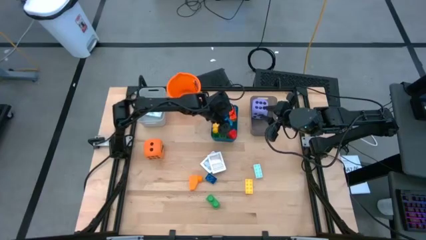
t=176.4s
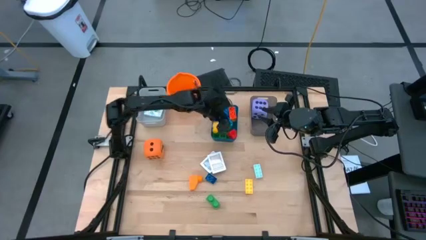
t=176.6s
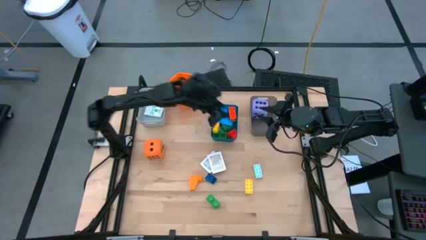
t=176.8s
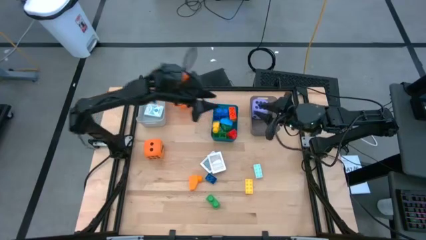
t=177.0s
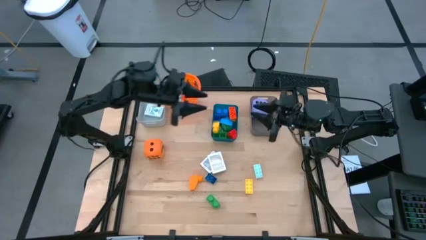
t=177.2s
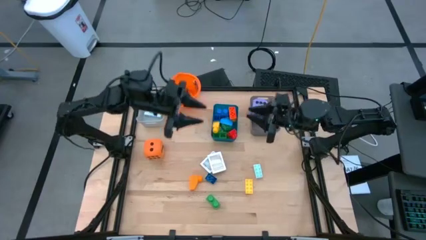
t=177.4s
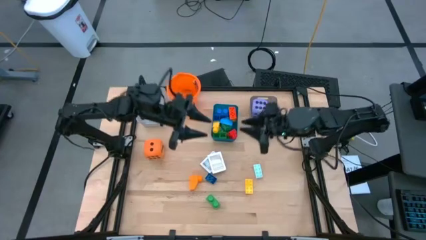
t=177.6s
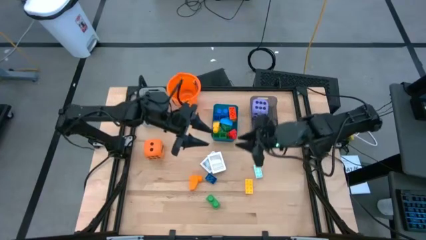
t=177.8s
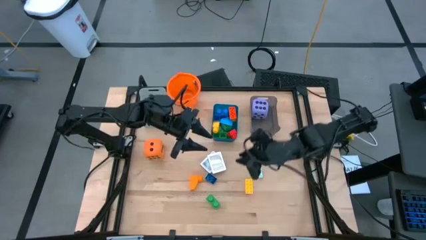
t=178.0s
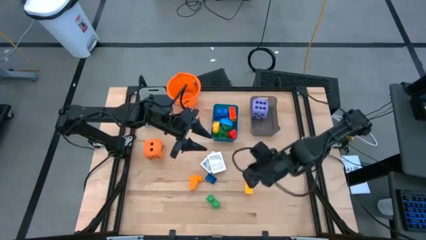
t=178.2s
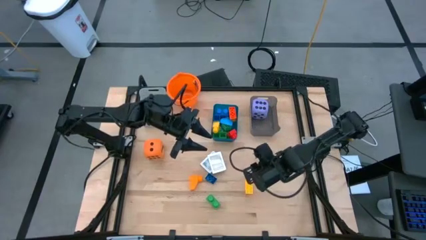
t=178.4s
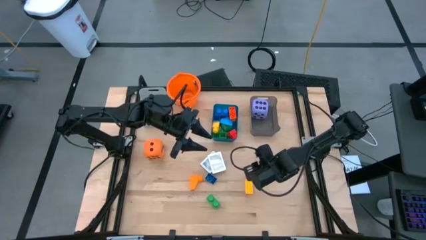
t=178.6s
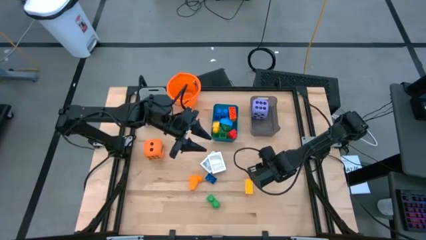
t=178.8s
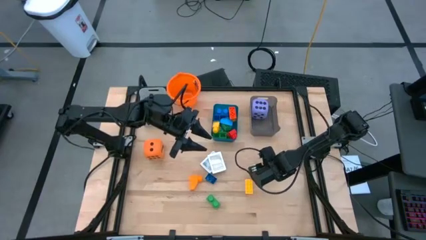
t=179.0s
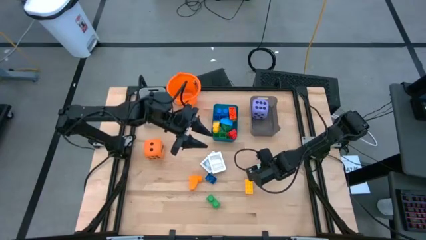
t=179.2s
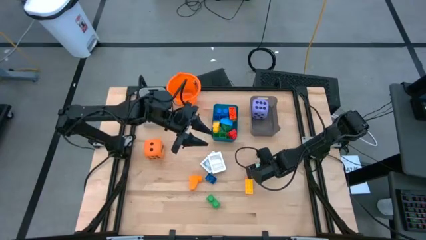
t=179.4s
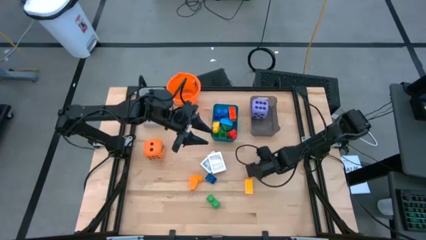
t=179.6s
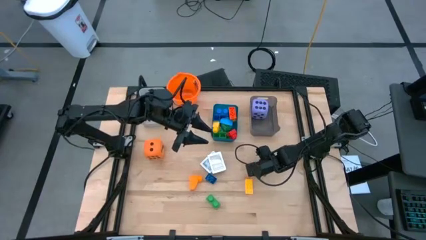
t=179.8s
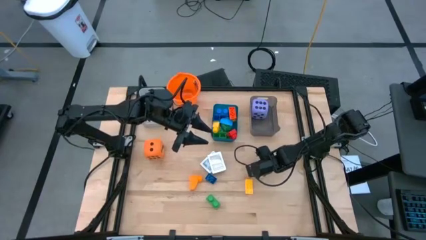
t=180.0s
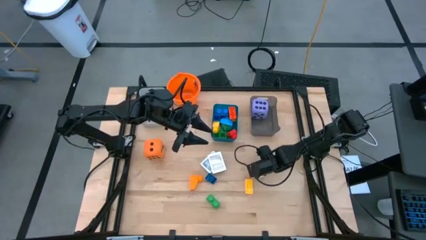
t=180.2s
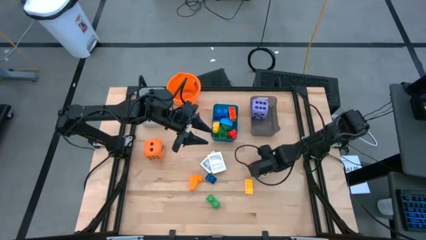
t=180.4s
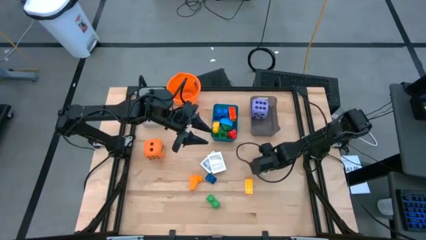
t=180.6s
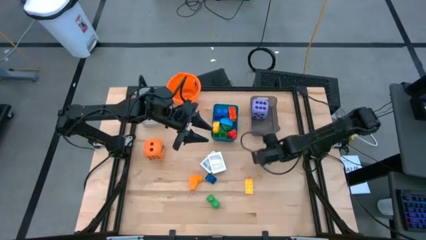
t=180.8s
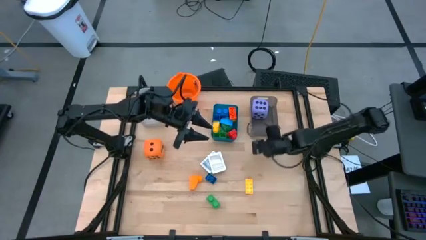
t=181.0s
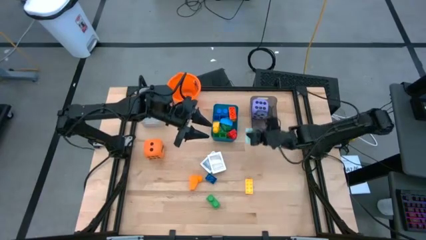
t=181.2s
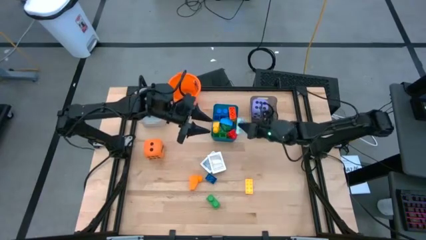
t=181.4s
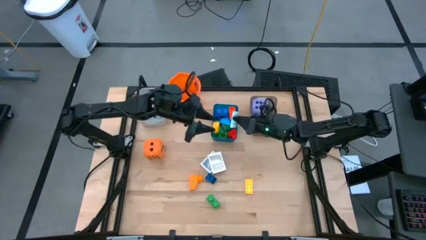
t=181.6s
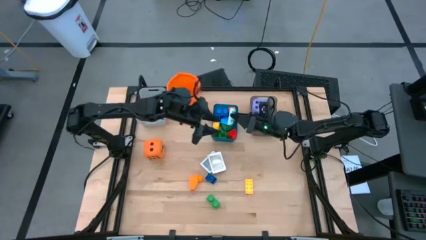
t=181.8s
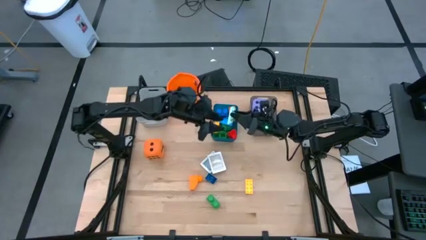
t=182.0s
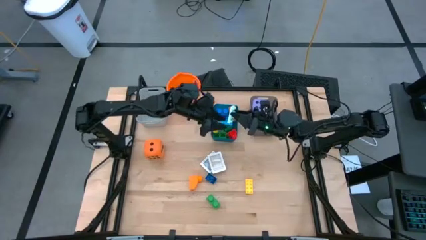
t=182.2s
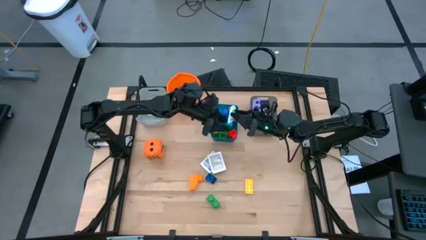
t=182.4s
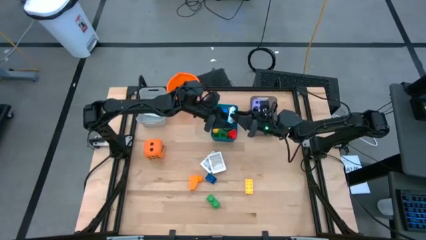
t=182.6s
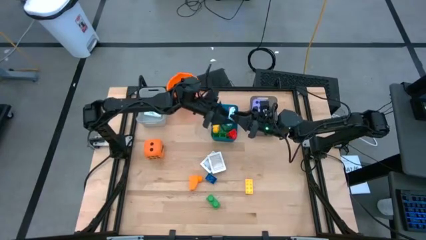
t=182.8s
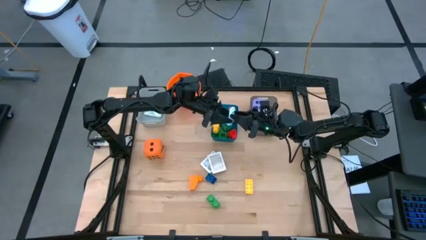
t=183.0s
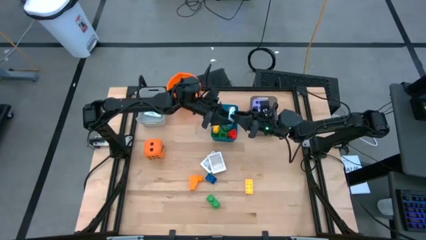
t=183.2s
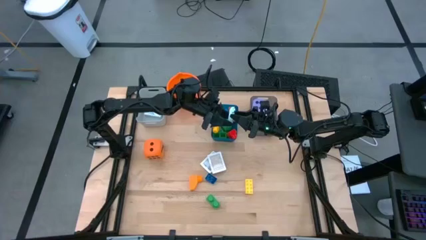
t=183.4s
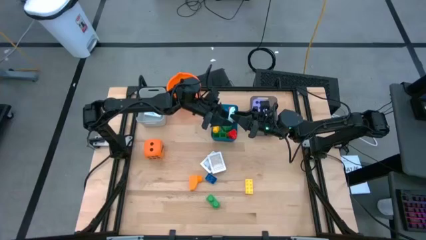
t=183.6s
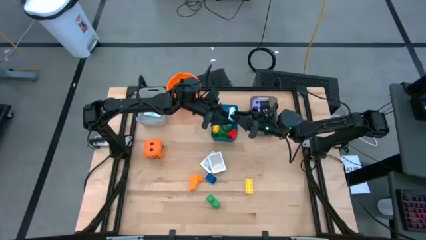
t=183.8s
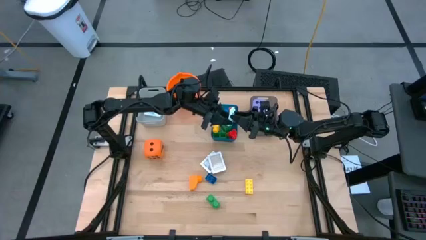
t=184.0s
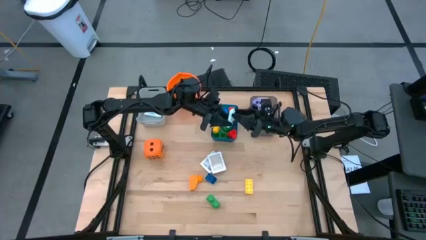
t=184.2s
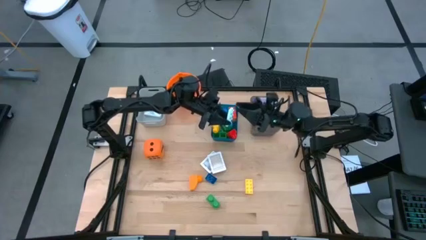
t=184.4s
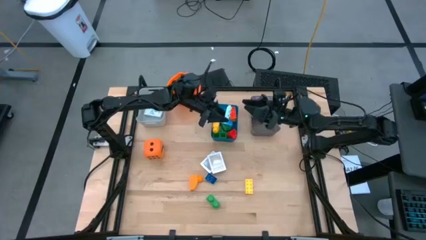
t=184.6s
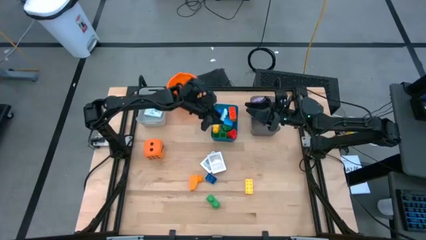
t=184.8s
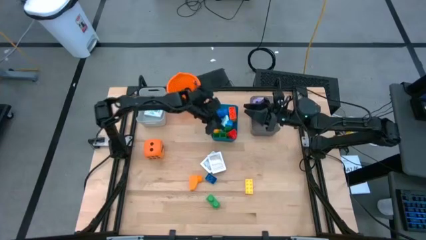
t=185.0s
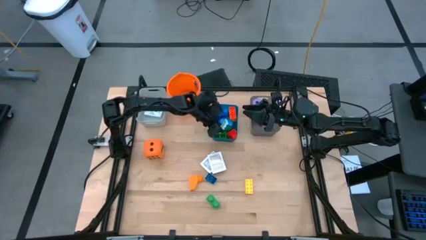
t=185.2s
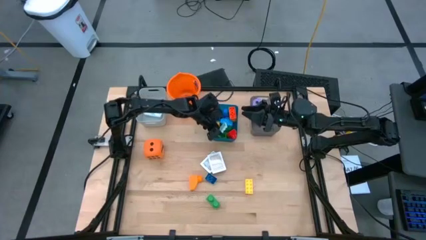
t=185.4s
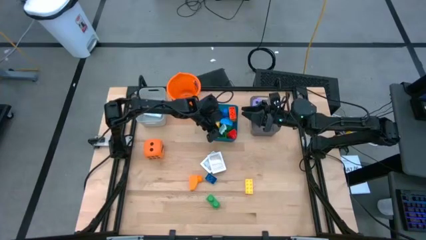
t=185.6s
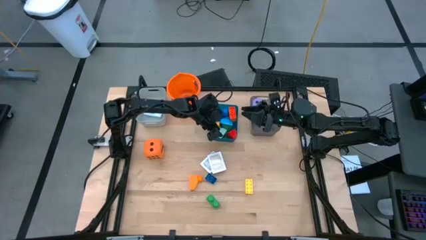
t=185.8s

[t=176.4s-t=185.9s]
Task: Pick & Place Toys
Put the light blue game piece into the blue bin

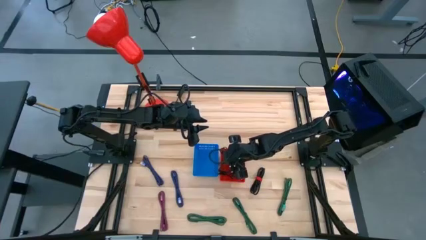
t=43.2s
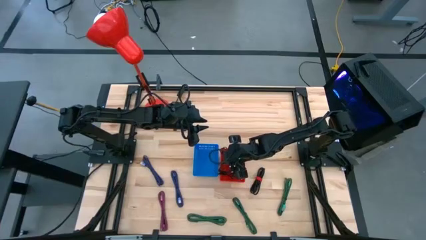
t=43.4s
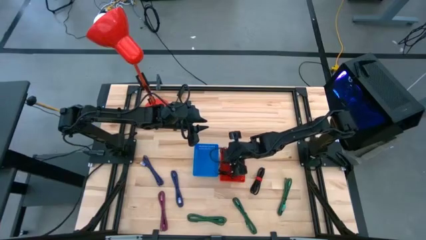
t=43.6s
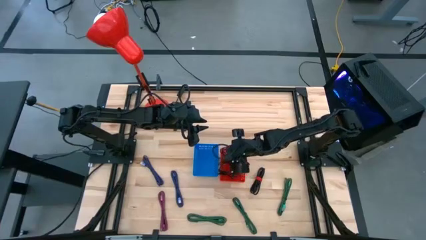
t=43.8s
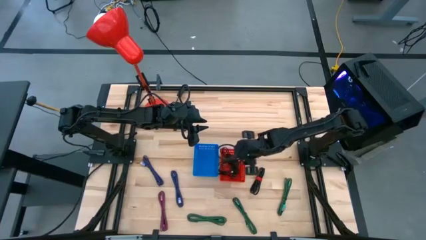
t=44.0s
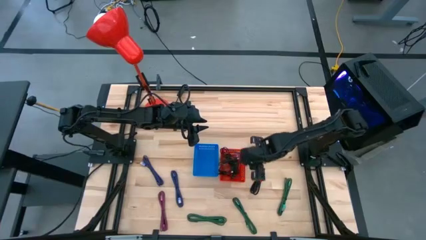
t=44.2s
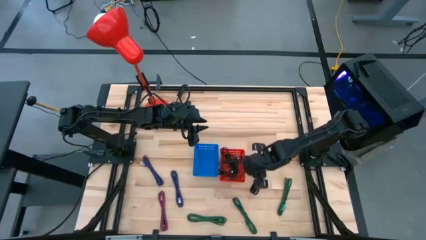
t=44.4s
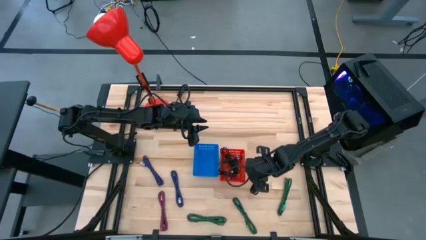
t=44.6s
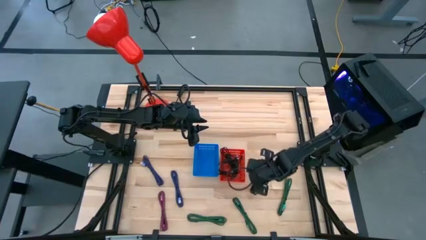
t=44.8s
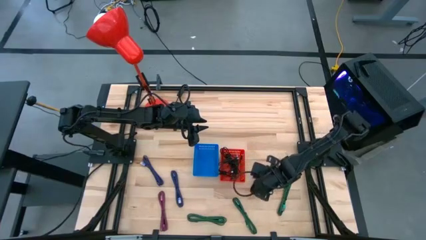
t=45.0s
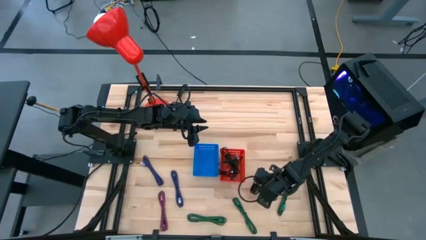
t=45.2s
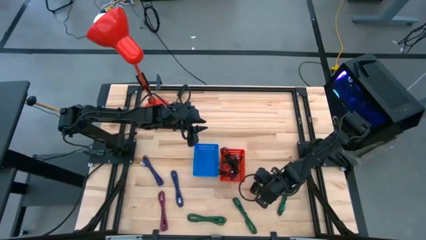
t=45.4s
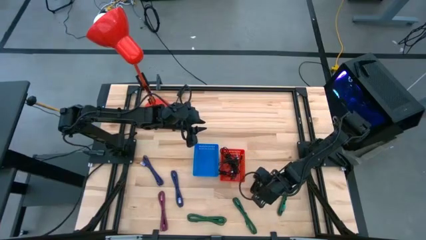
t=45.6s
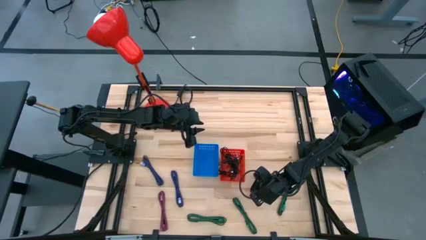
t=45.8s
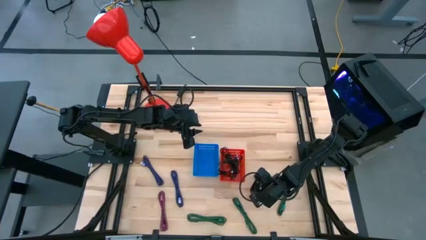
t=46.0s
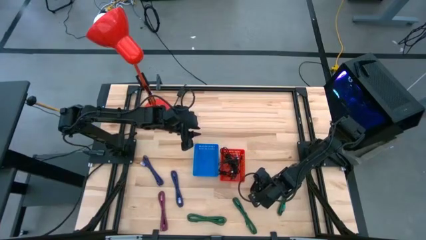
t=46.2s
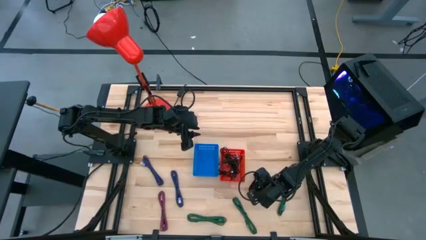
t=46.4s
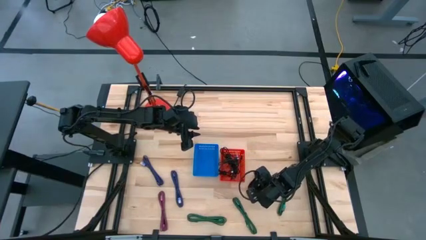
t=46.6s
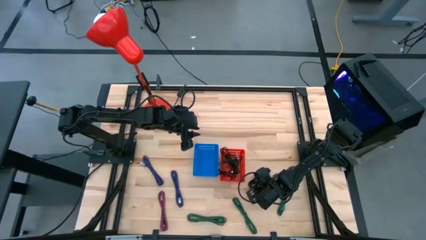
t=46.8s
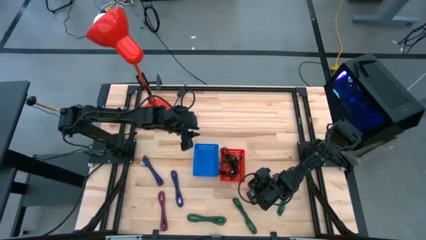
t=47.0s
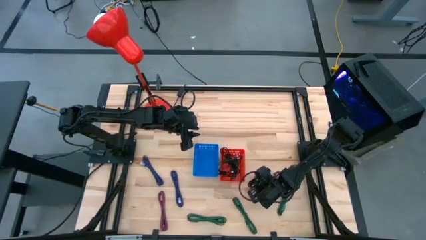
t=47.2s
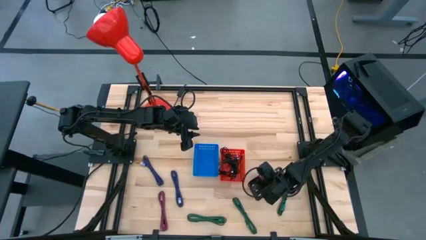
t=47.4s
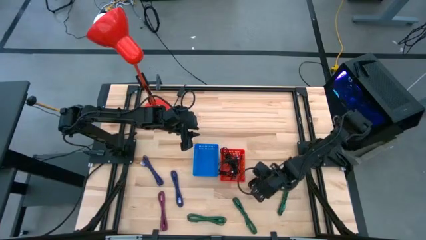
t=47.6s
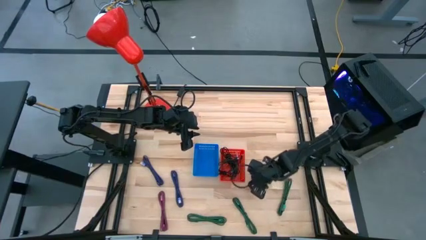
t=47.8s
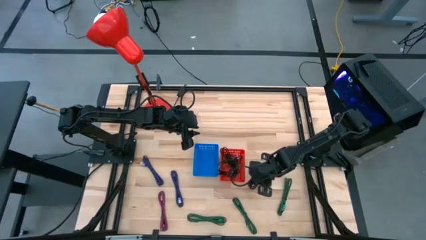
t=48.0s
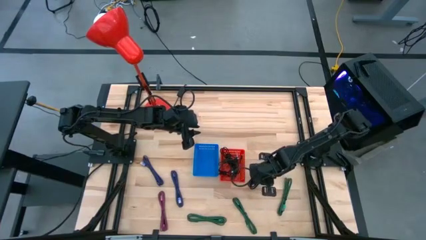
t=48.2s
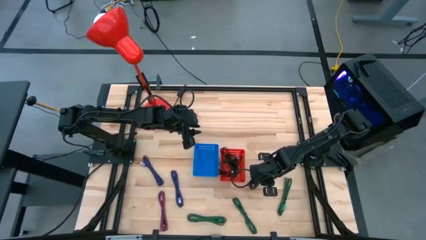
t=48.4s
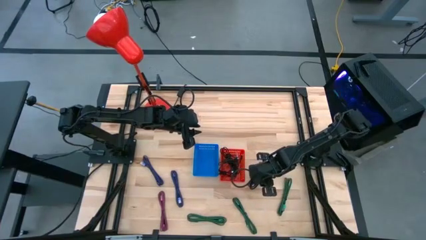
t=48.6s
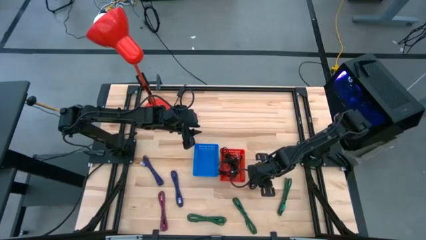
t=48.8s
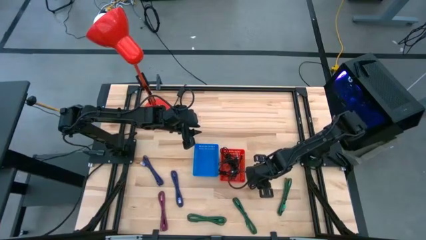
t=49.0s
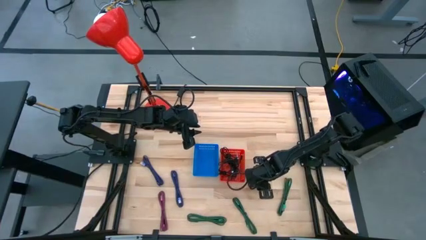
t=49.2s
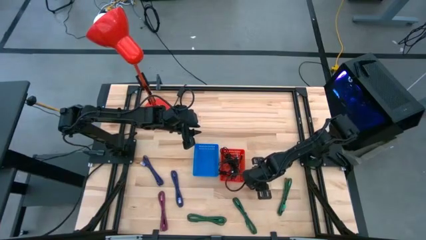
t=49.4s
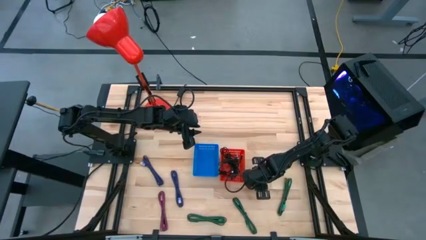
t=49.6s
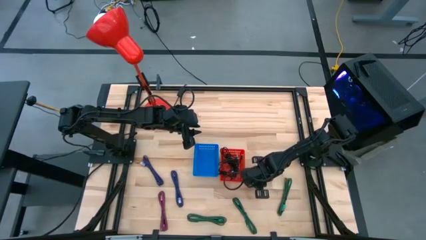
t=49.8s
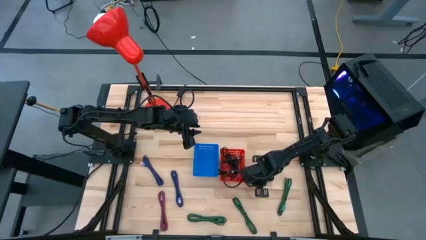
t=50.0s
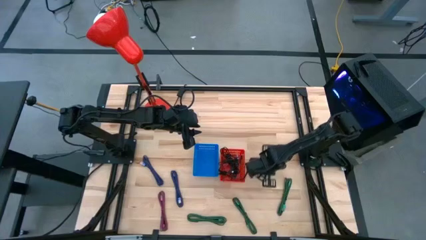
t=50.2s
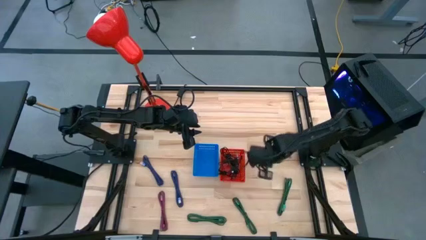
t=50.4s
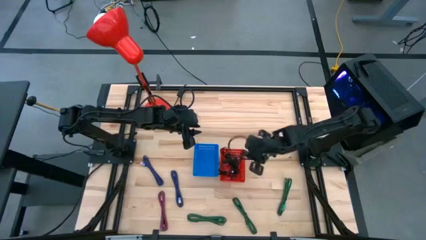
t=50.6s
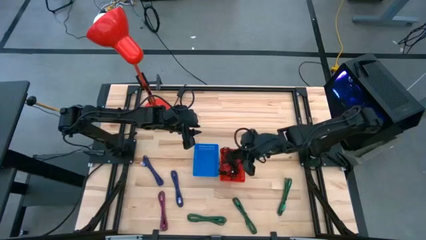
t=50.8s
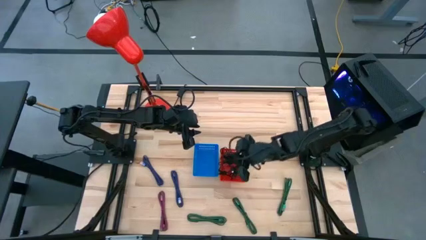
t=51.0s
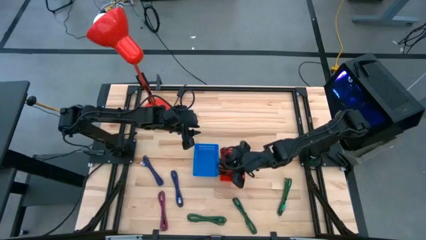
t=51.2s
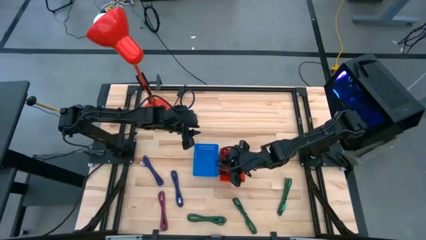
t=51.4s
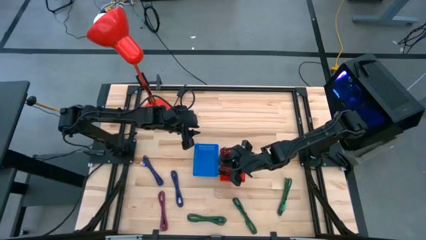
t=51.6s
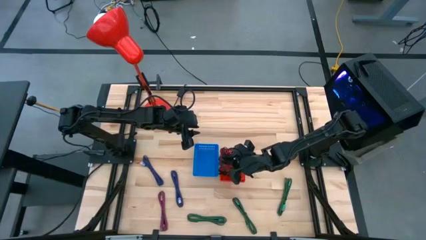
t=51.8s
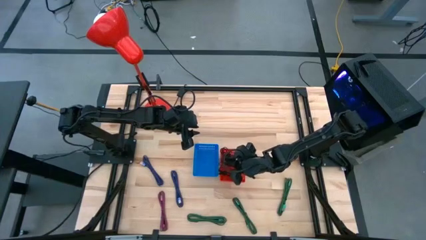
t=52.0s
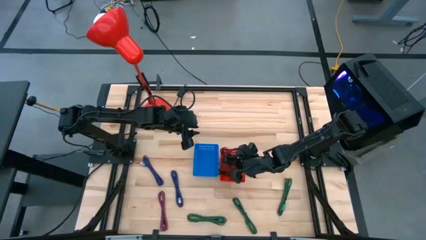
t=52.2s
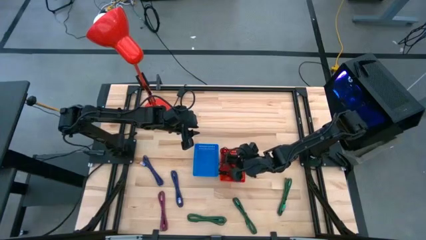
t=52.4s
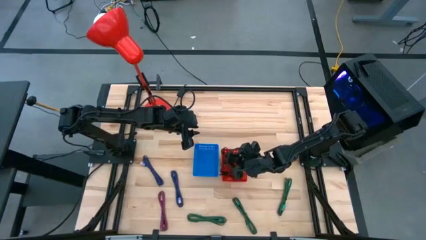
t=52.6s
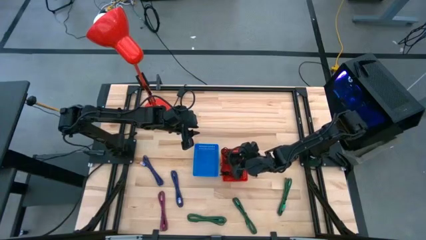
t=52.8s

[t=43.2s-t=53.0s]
Task: Pick & Place USB Port
Put the black charger cable into the red bin
